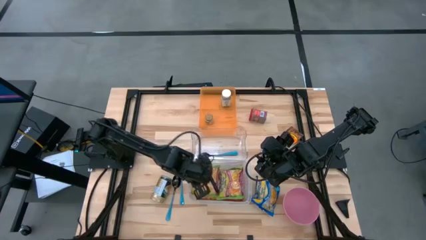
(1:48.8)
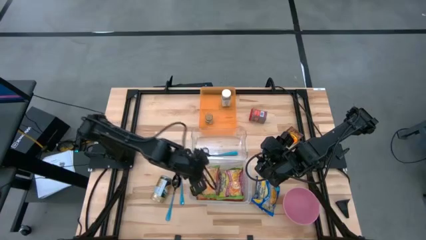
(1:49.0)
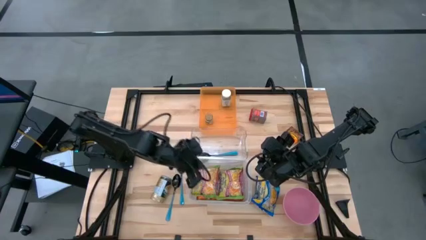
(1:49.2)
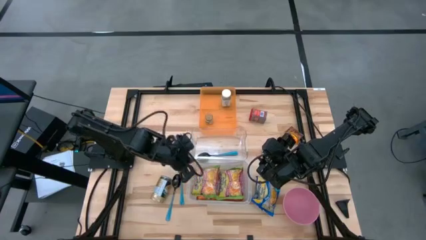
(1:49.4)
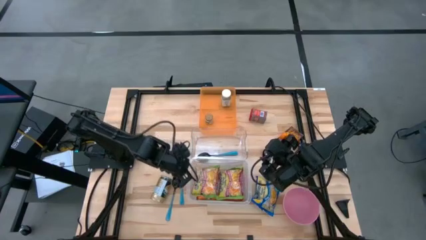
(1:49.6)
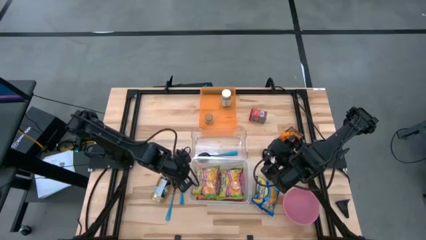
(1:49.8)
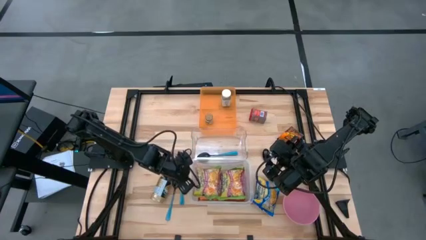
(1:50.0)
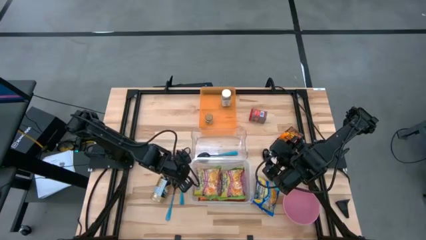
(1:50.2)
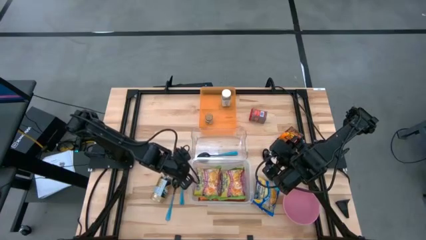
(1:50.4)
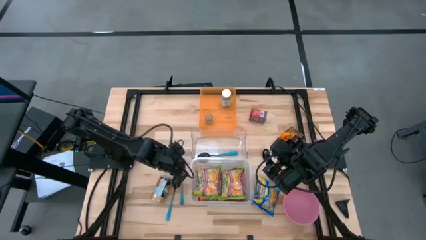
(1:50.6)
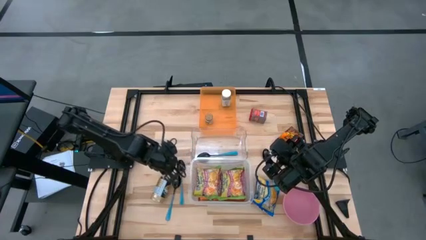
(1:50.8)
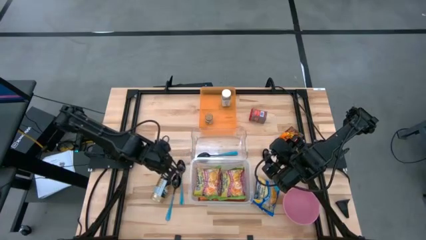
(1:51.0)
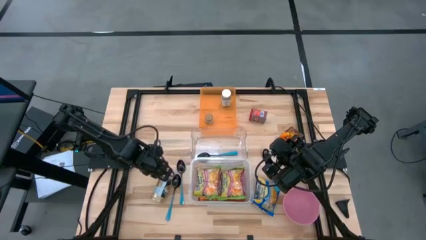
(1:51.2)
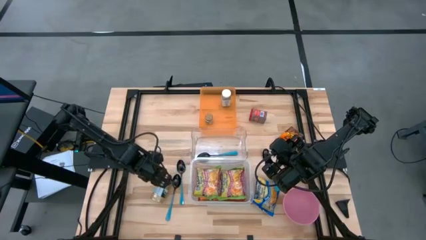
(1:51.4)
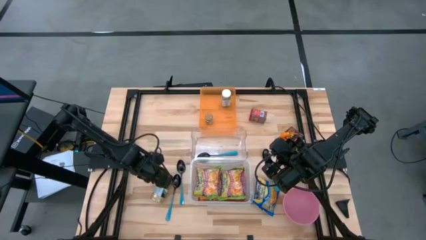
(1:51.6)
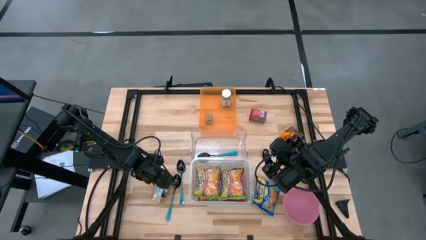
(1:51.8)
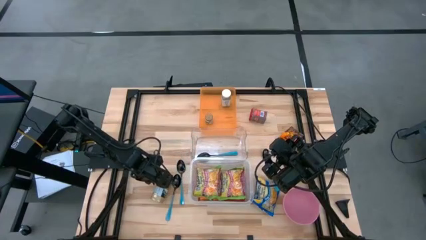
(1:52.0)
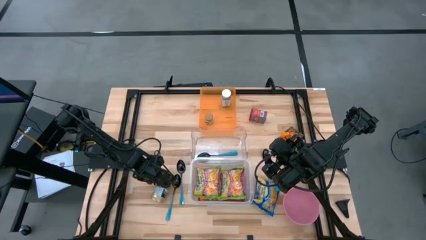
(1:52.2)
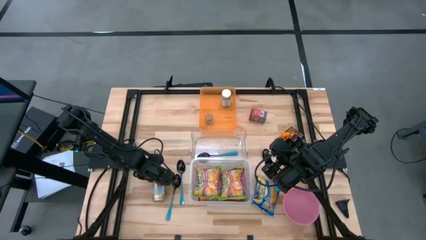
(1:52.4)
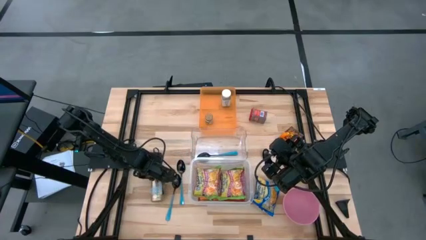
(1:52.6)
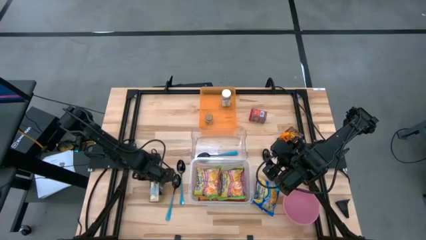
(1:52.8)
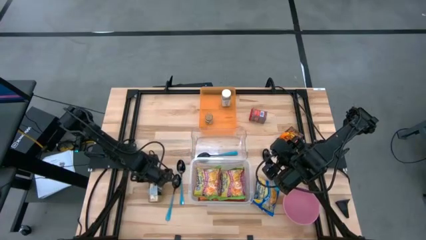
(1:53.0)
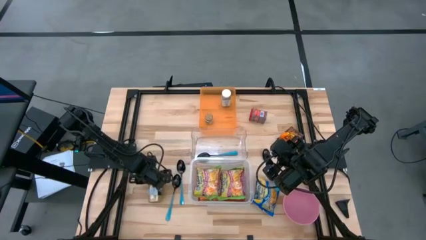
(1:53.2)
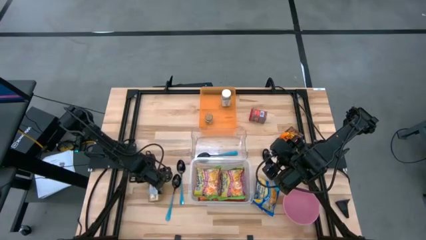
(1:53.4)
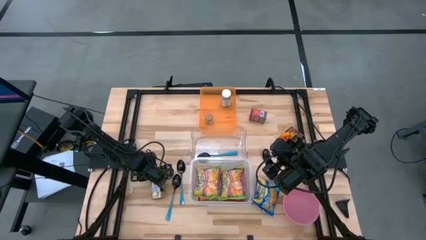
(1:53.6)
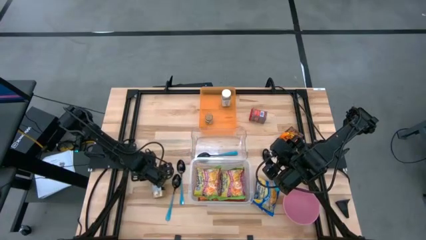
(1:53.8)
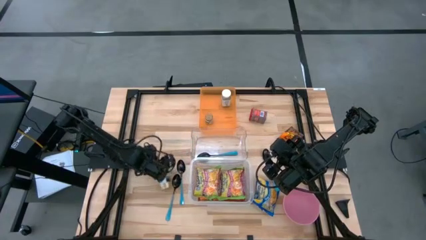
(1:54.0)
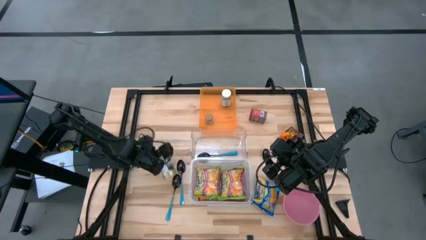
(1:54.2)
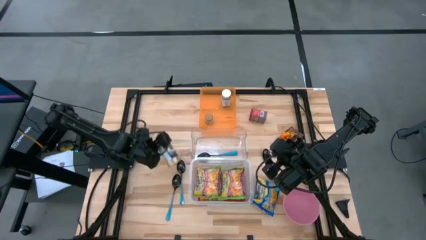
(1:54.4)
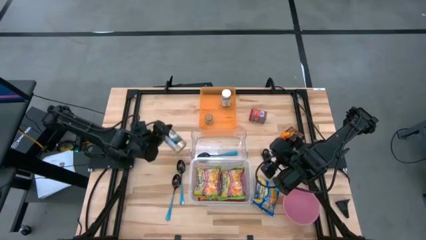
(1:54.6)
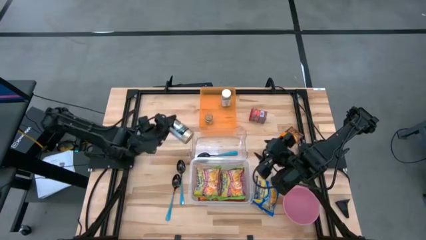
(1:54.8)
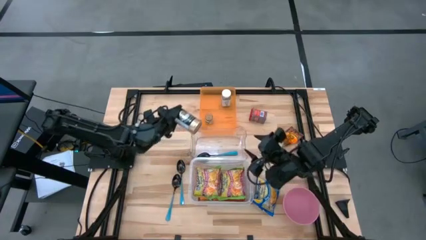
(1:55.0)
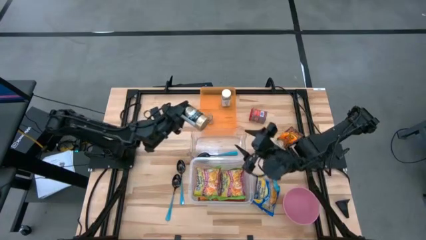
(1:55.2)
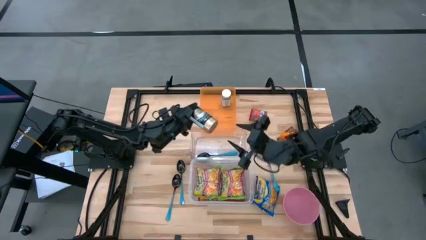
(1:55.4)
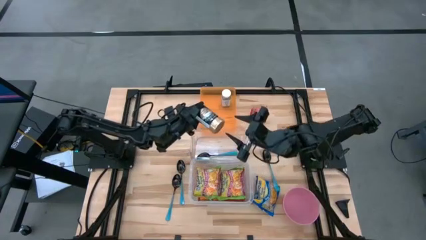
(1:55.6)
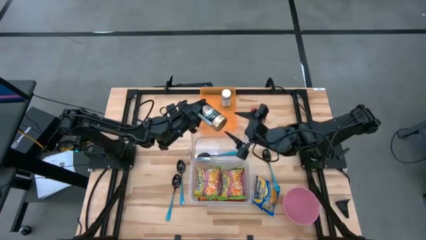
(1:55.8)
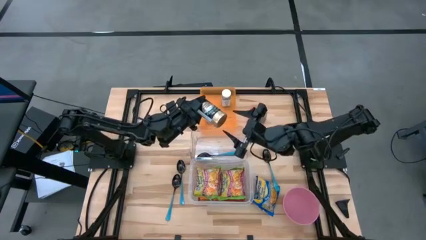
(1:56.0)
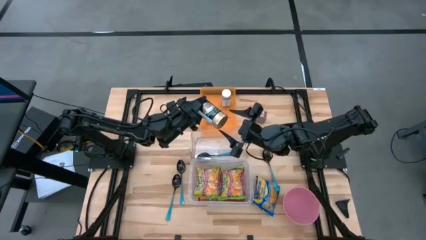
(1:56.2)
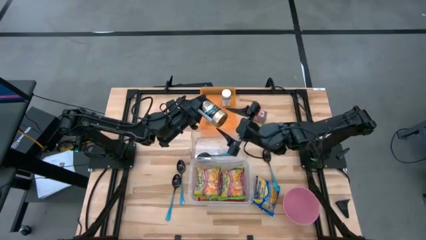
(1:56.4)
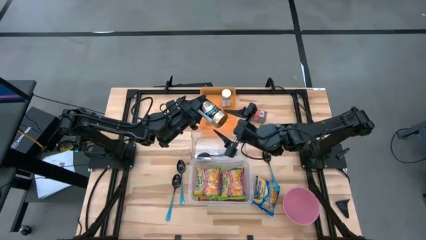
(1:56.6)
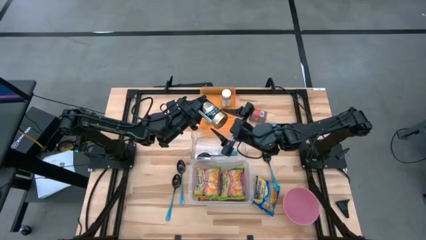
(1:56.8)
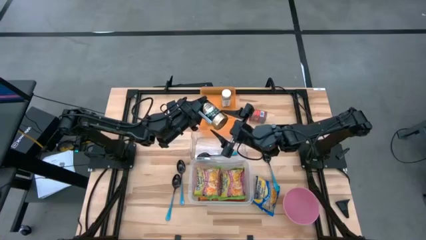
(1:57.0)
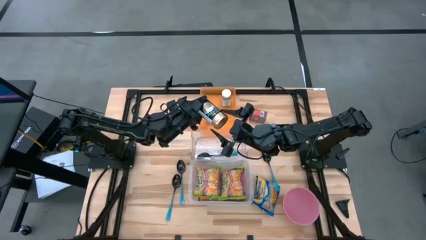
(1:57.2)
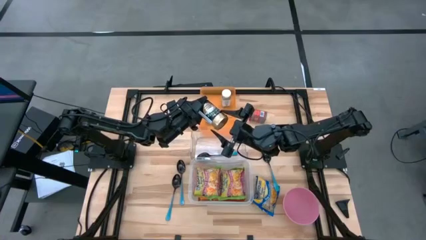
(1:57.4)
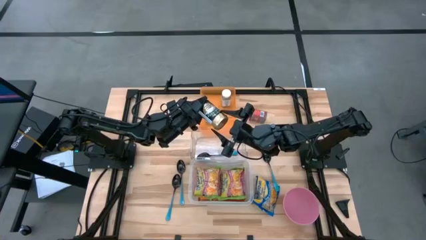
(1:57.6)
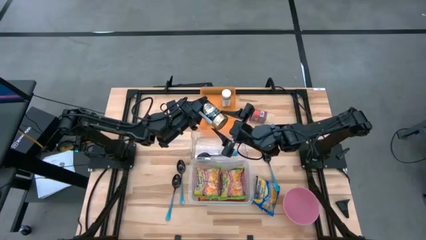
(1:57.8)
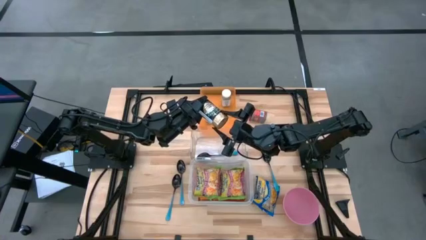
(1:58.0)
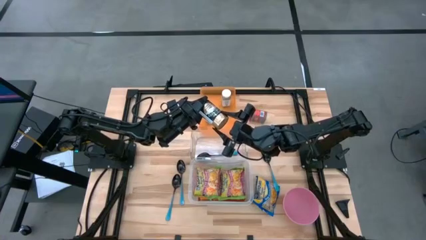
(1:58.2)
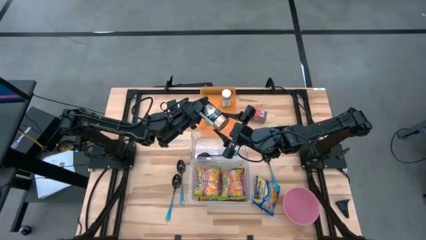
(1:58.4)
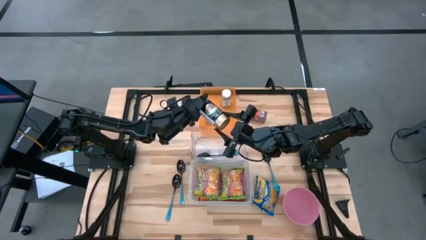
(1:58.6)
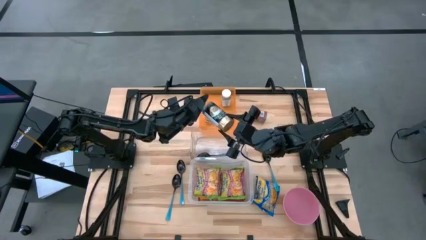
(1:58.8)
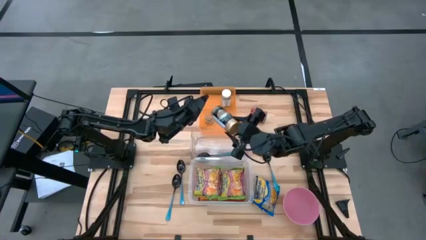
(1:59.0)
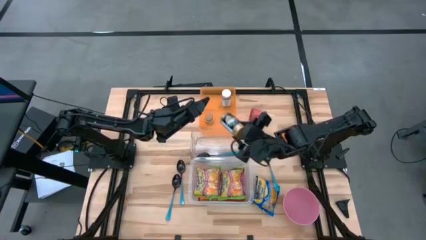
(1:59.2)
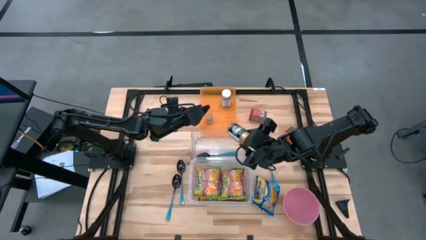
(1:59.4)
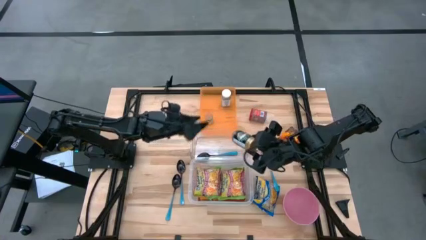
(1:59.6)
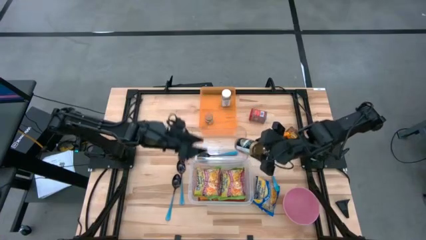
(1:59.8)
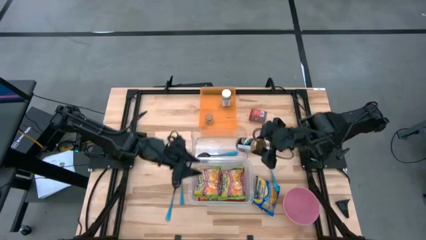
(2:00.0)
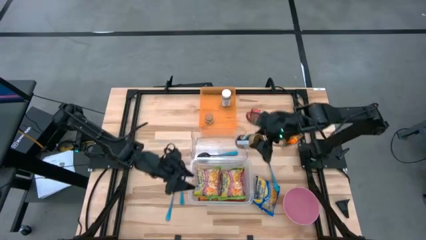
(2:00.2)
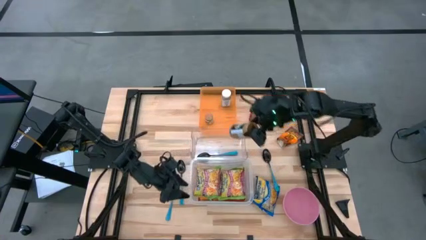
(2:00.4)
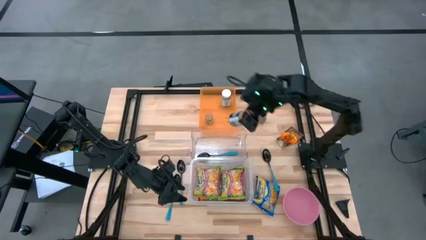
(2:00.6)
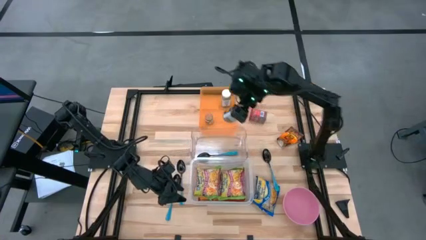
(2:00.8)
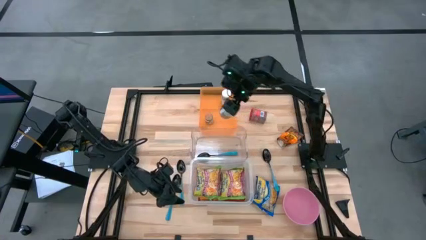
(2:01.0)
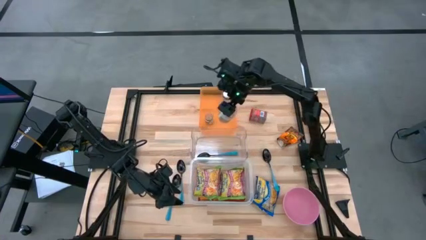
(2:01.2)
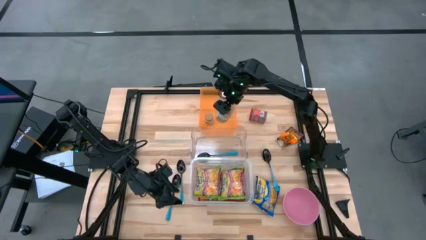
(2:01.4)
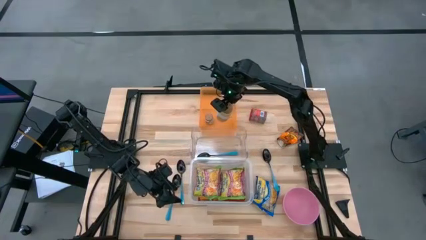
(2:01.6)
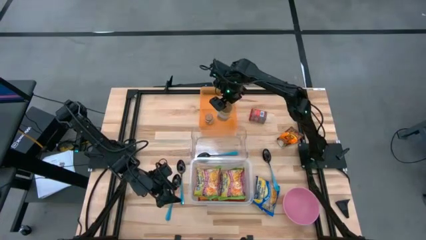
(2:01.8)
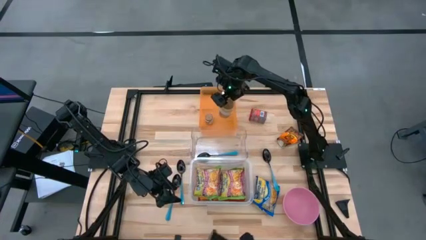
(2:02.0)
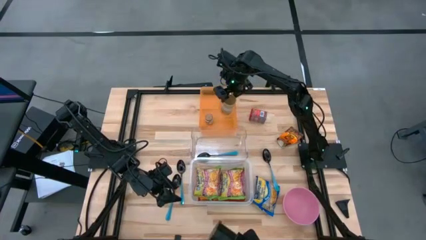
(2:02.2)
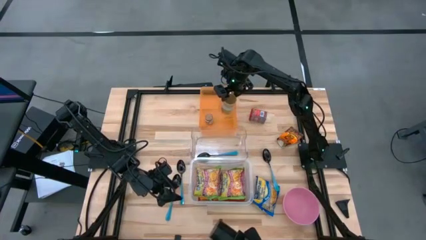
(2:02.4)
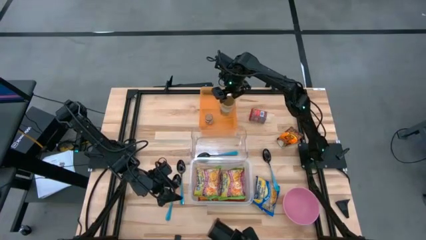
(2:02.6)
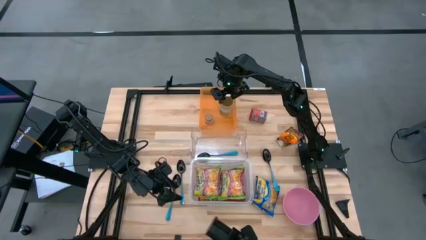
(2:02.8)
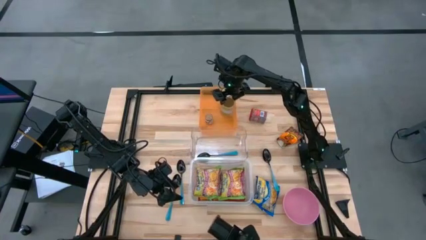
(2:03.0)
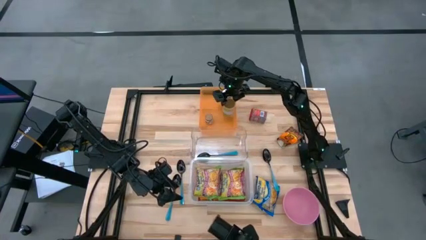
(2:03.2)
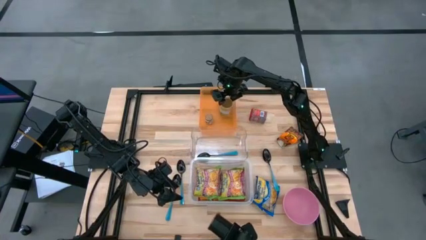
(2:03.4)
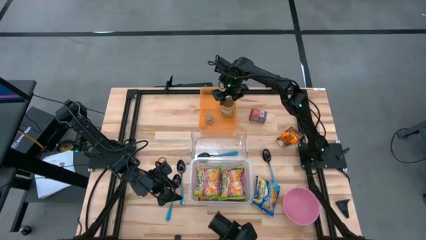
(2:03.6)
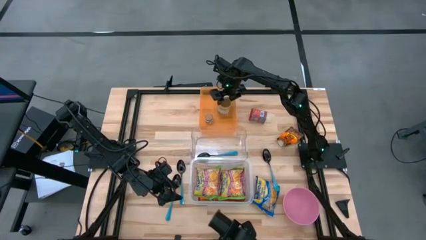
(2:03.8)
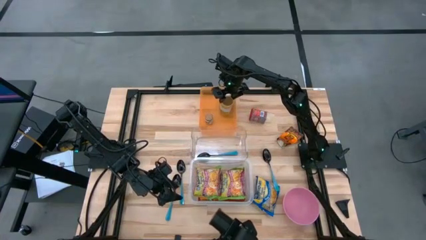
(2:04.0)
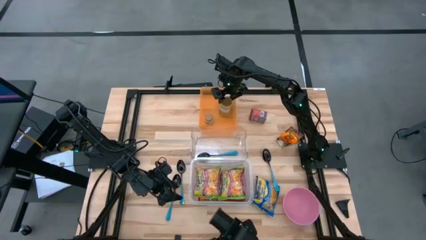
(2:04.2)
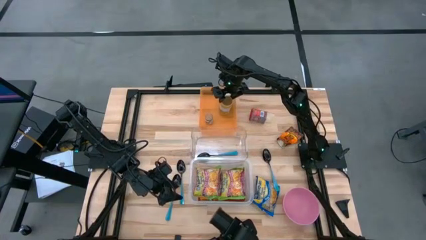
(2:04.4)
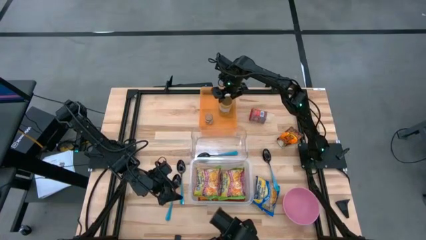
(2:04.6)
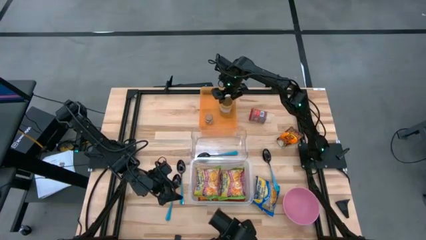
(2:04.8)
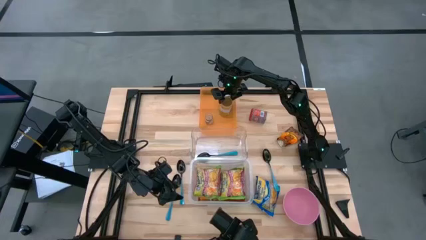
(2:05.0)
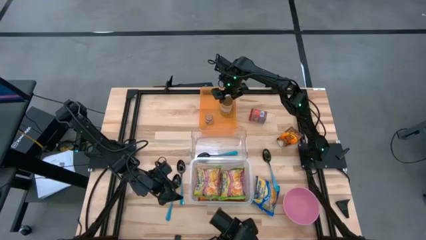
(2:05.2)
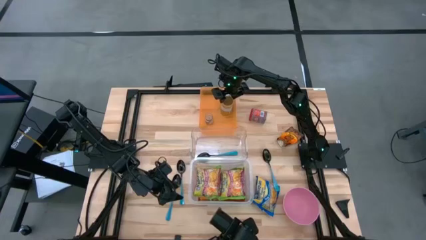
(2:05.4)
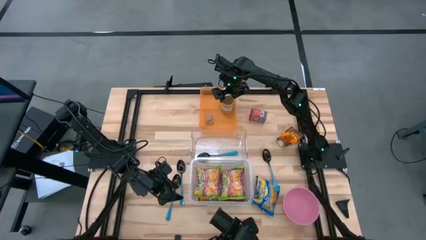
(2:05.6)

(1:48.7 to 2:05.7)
Task: Pick & Place Food Item
Put the gold seasoning bottle into the orange transparent bin
